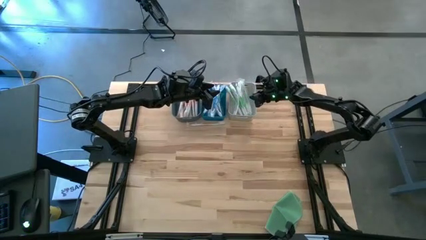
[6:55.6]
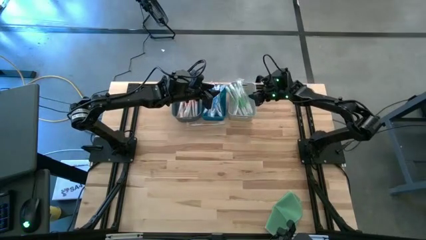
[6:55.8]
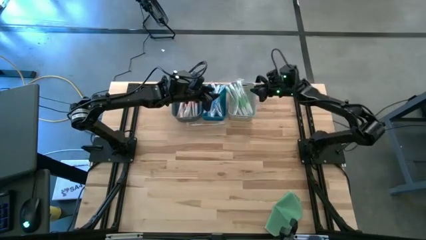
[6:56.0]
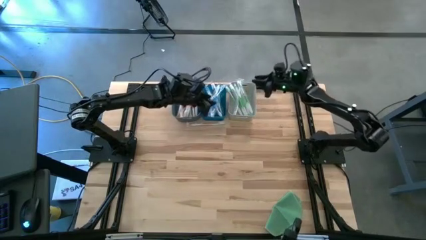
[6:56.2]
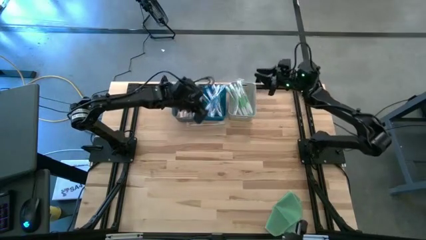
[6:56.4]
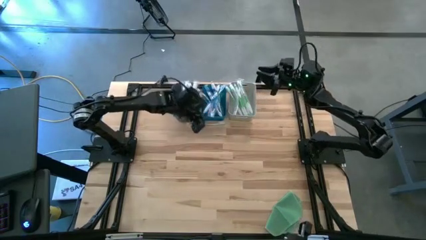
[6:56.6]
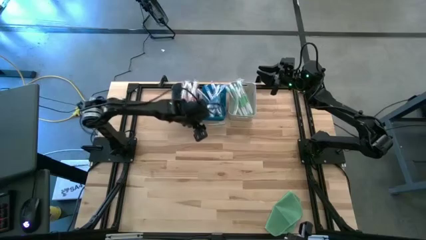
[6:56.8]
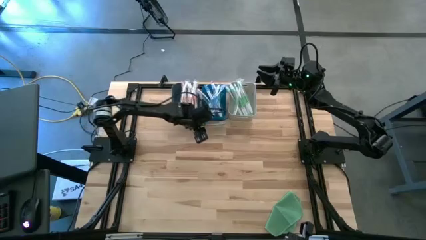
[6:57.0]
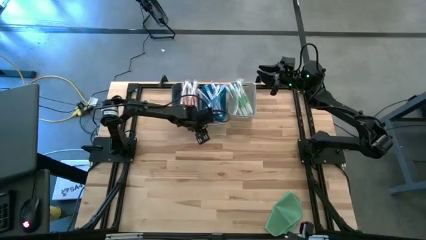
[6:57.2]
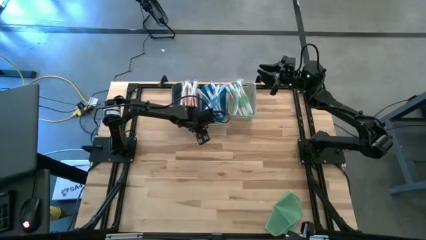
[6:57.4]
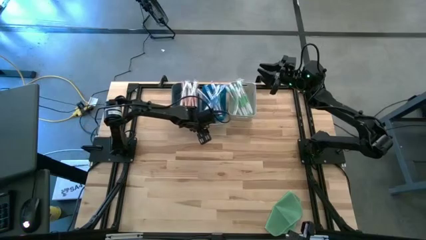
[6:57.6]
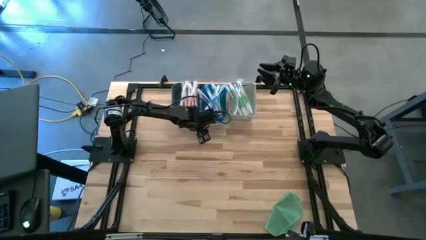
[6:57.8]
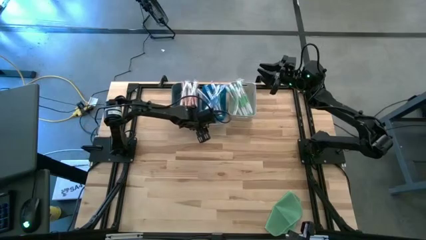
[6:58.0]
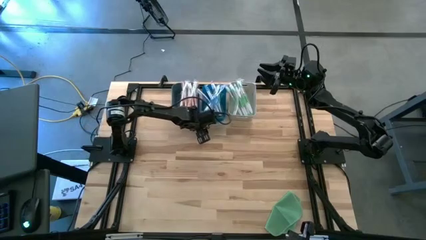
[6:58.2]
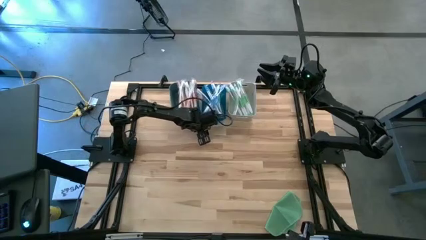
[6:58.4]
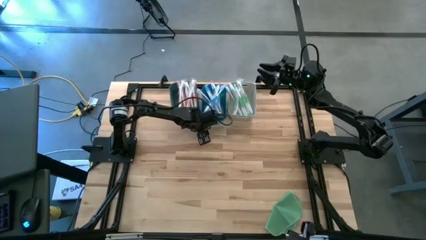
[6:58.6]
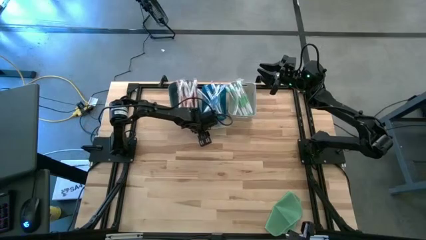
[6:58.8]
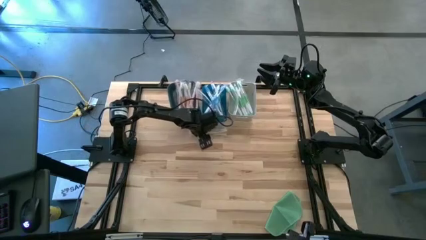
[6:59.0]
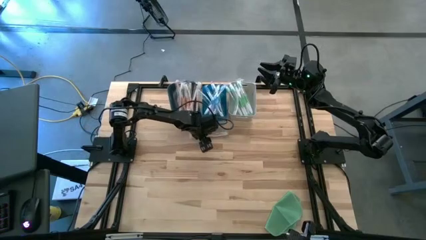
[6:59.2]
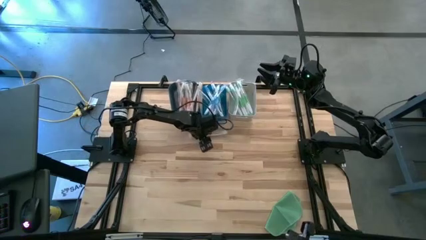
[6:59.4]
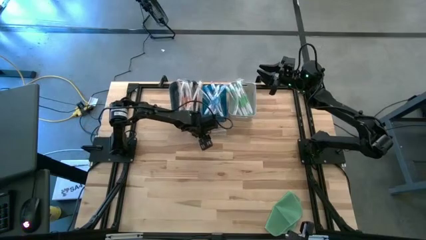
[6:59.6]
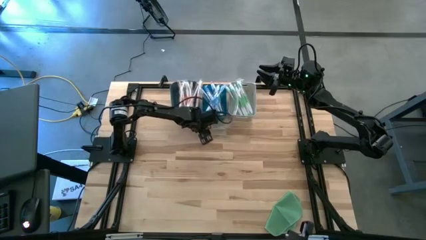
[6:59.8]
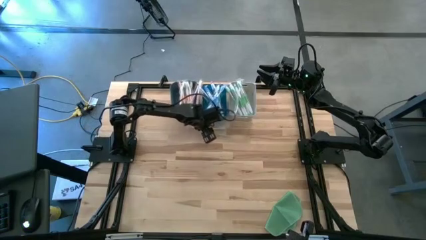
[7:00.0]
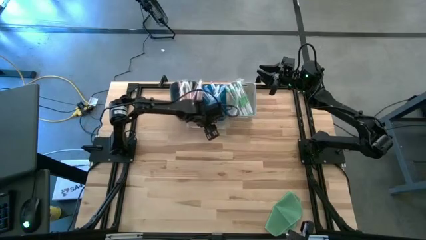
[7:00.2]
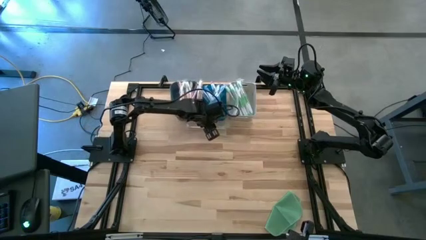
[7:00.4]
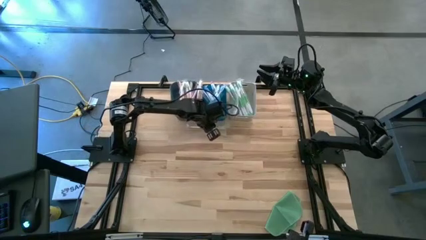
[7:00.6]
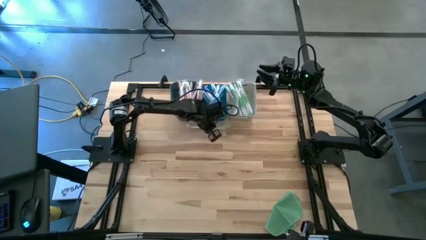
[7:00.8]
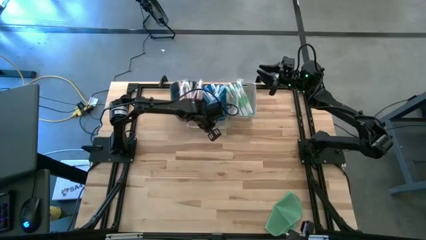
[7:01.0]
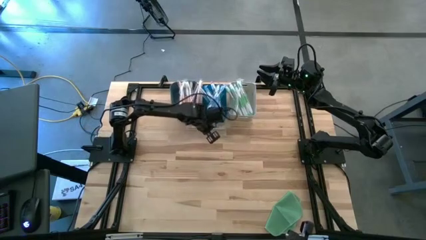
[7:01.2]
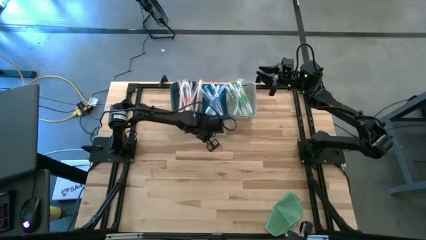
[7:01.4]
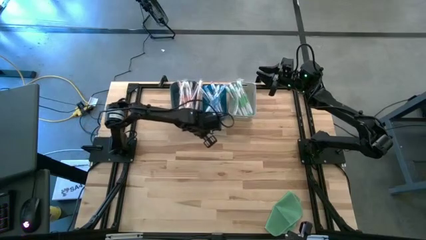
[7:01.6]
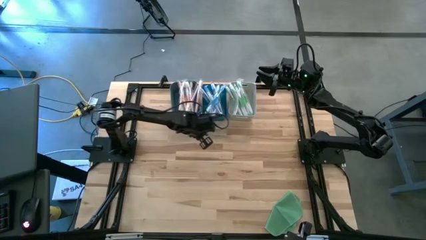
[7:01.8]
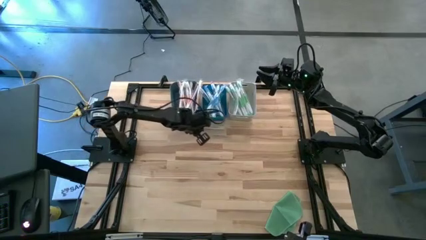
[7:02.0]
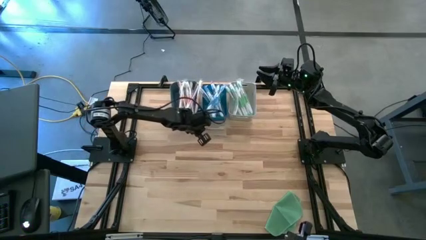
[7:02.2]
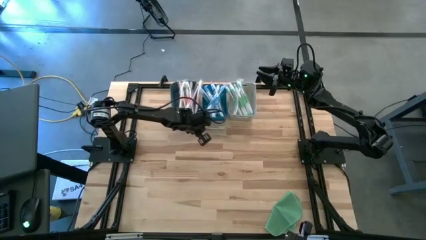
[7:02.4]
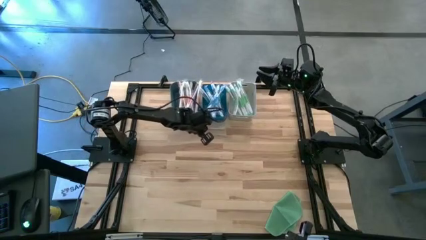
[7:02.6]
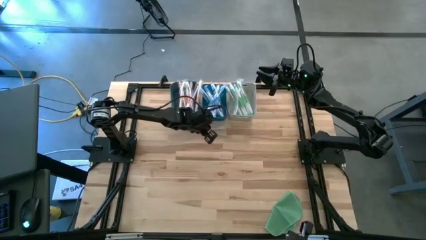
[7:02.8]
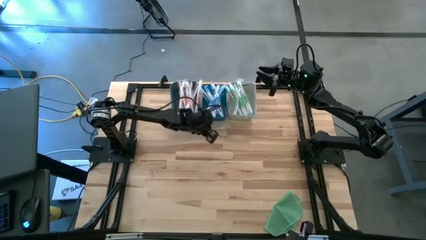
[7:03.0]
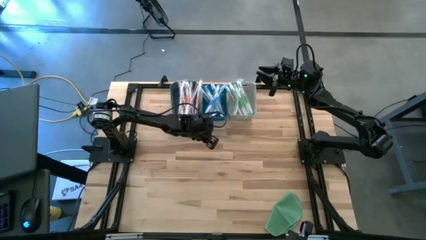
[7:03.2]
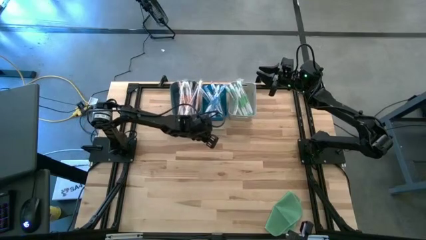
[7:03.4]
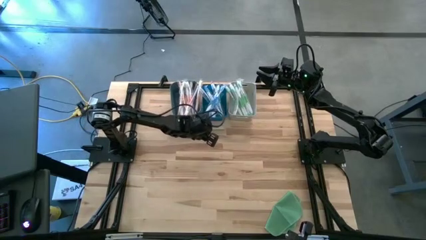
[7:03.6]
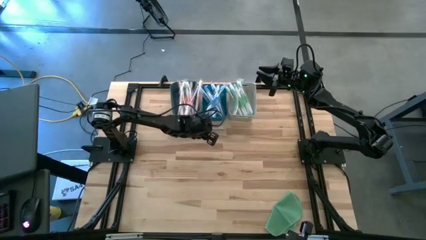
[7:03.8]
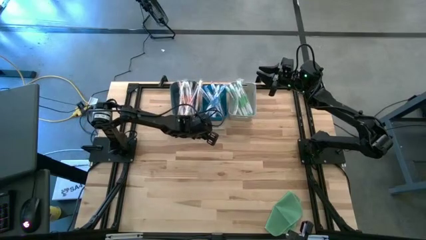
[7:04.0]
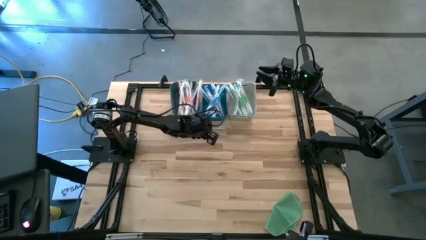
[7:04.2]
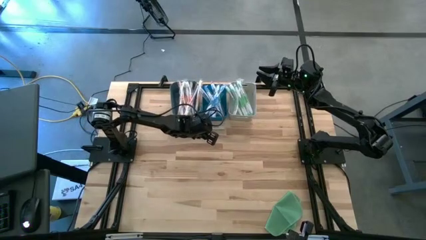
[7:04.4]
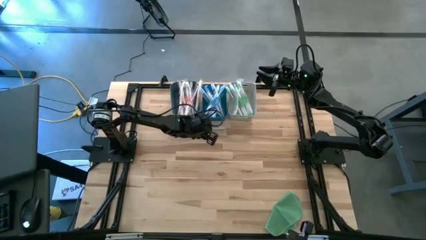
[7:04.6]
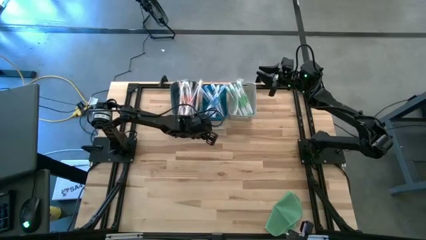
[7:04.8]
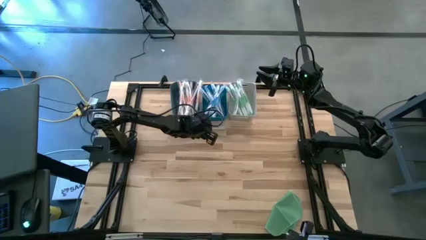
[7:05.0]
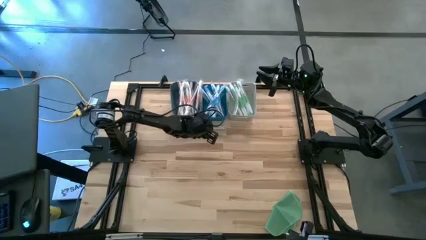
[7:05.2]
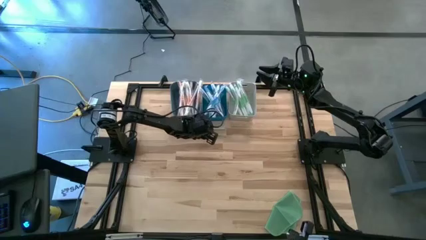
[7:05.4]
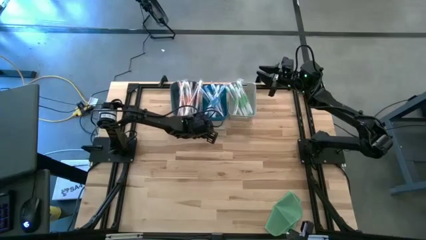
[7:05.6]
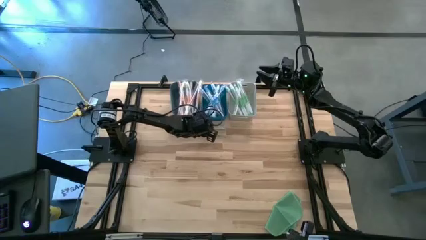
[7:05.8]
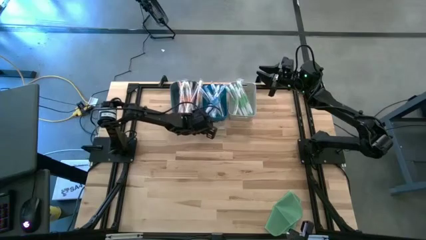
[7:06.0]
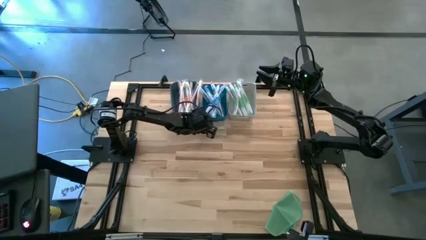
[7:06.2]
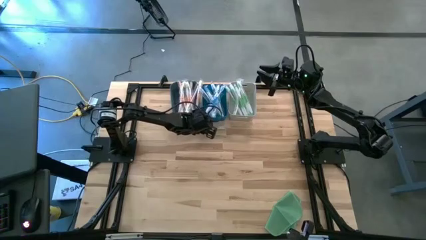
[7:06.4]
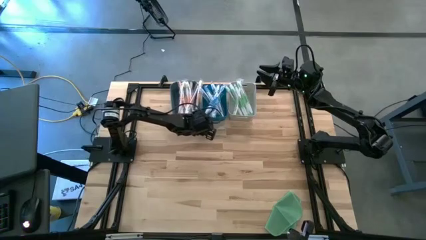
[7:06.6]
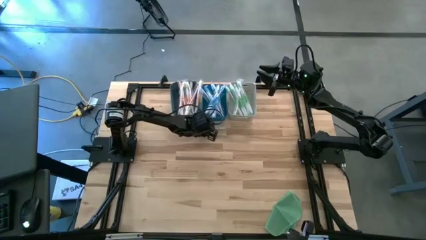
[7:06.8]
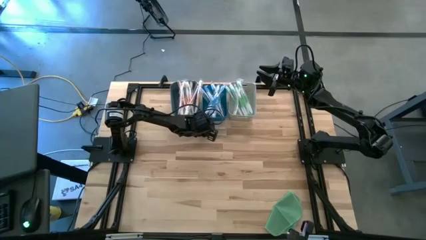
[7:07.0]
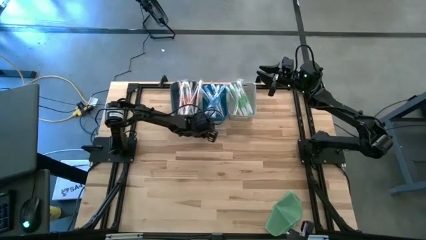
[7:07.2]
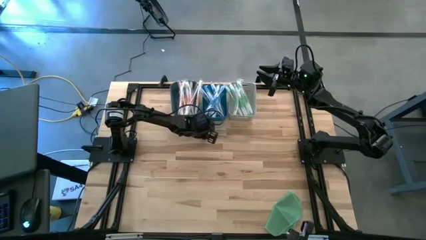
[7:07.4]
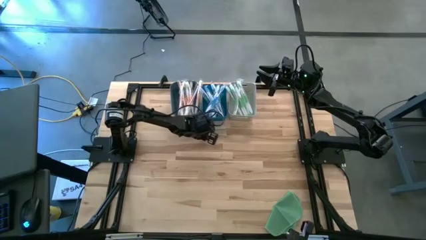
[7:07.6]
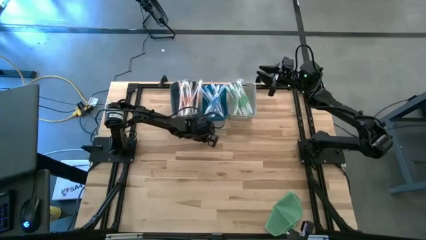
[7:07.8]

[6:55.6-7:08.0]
Task: Pick & Place Toothbrushes
Put the orange toothbrush into the dark blue bin

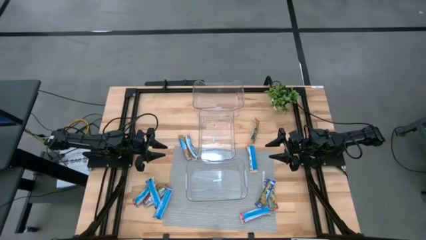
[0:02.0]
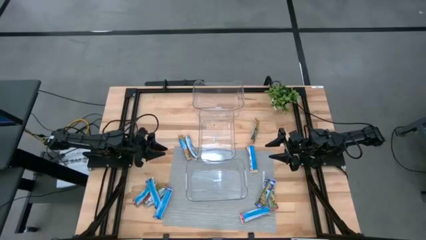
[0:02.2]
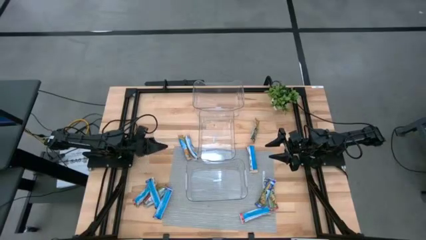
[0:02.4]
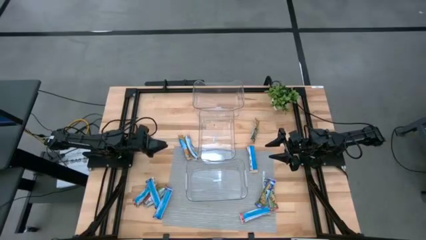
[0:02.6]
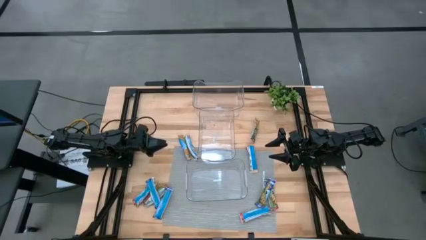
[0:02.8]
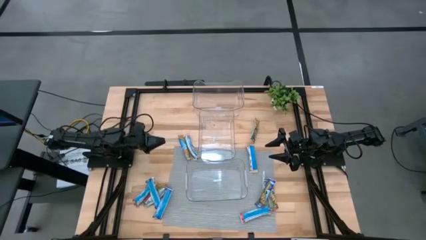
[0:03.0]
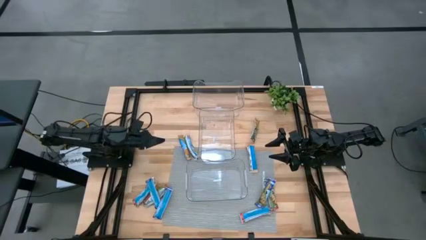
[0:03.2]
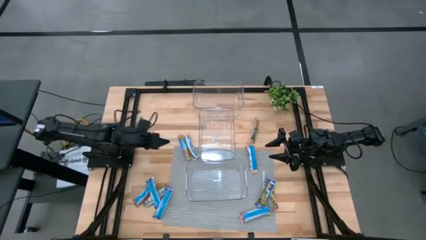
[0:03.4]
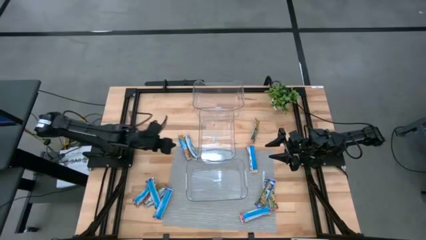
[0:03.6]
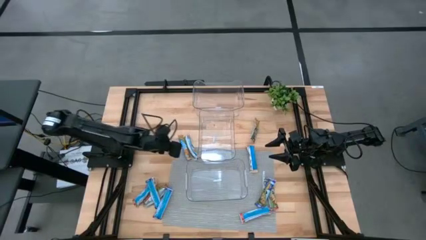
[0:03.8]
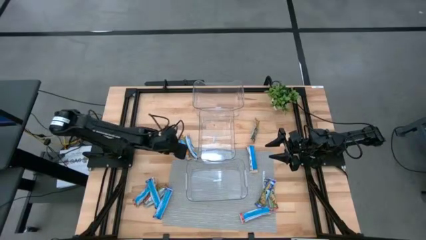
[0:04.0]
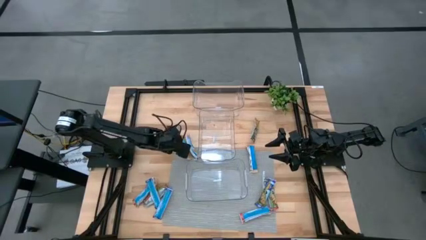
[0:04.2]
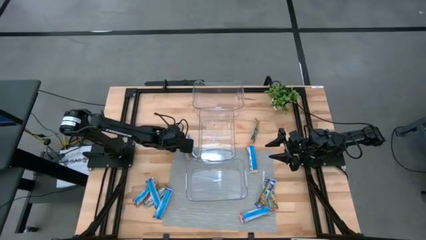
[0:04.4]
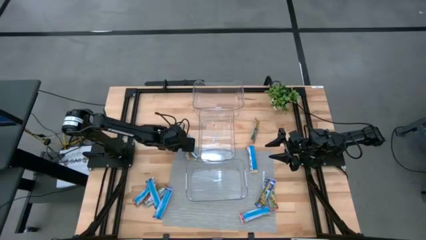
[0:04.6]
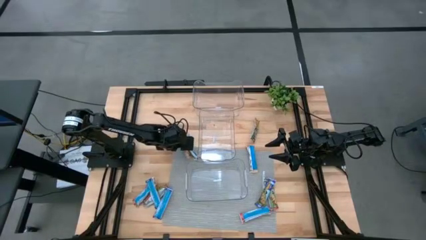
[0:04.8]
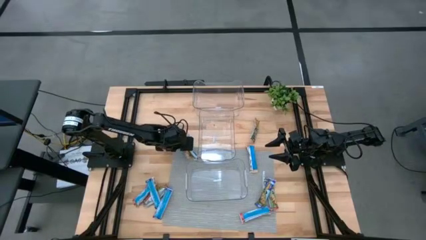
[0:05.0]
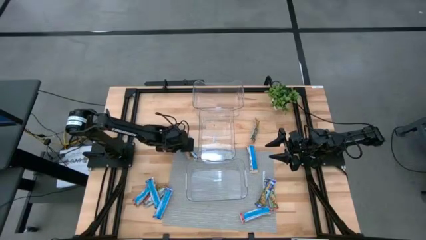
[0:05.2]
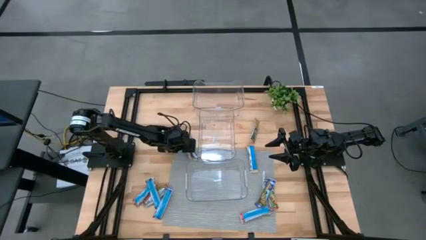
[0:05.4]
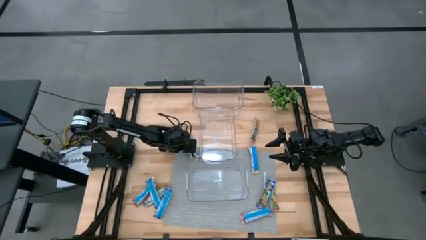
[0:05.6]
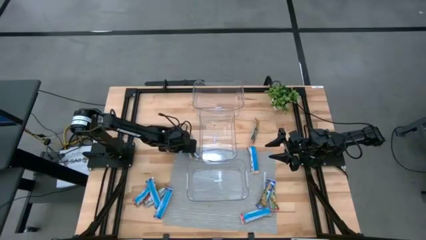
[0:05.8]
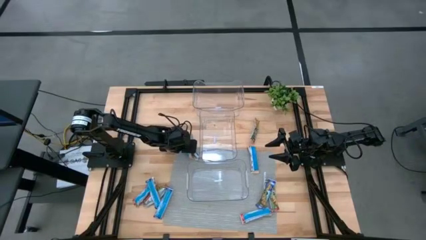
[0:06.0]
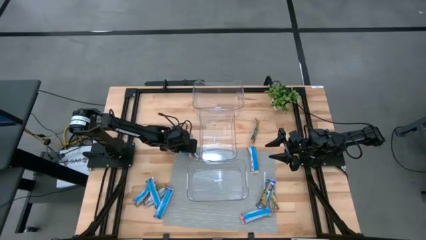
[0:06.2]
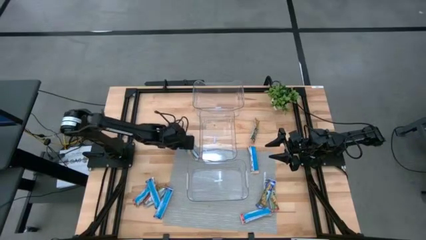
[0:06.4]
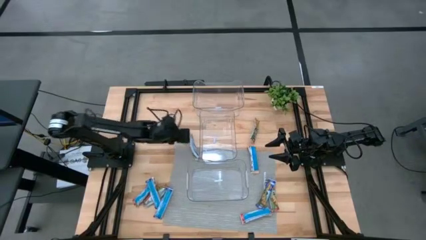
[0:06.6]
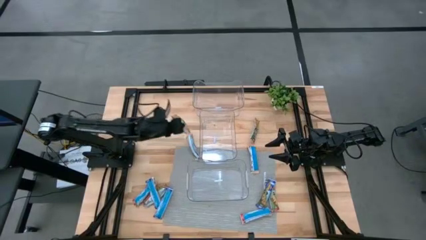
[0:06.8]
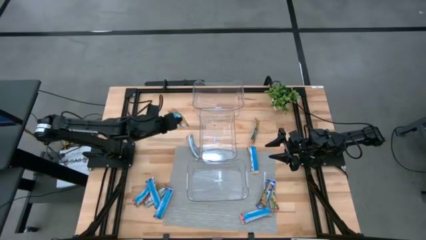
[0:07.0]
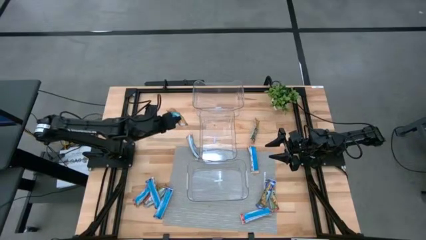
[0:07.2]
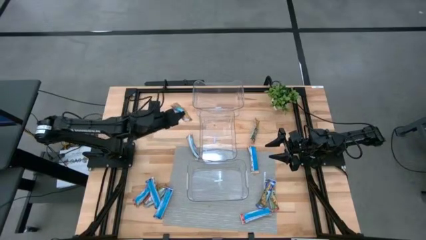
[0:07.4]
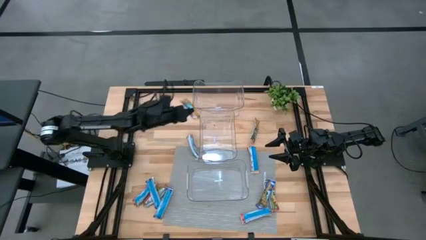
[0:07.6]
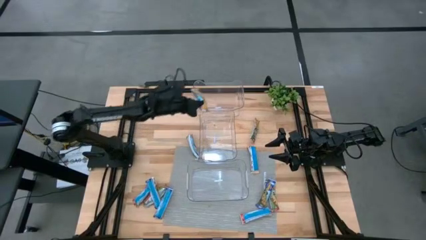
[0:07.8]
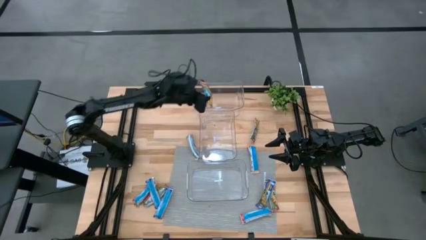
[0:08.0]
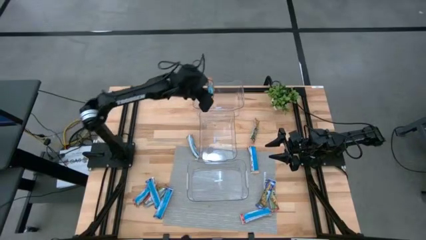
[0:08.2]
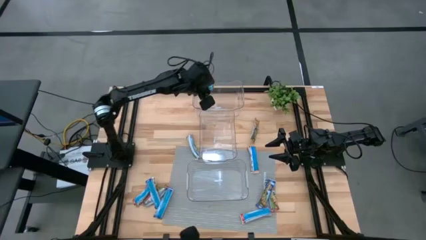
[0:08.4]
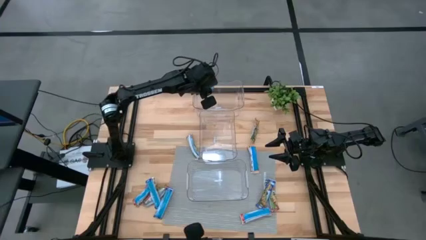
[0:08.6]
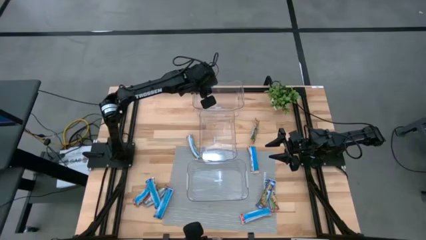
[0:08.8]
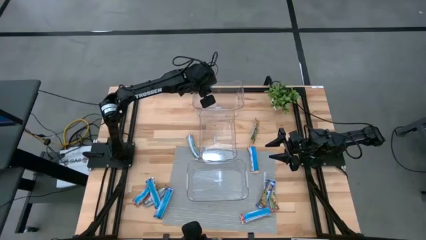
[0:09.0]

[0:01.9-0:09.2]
Task: Pick and place Granola Bars by type
Put the yellow granola bar into the top transparent bin
